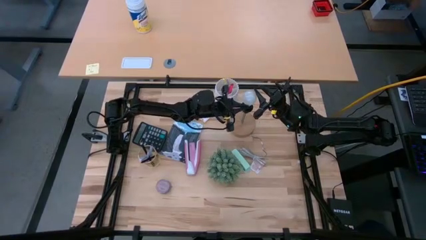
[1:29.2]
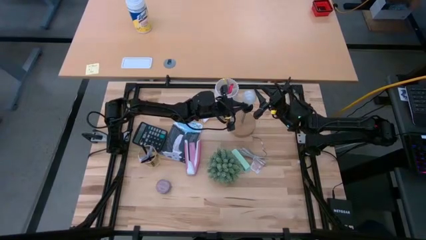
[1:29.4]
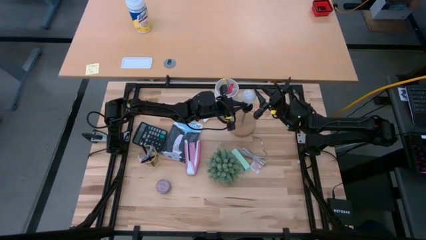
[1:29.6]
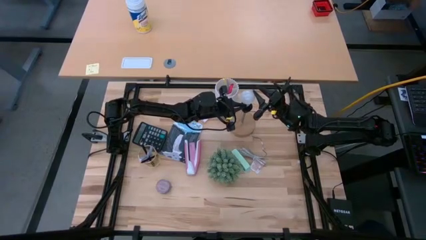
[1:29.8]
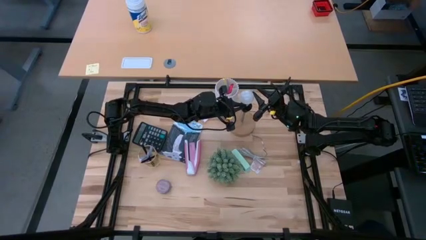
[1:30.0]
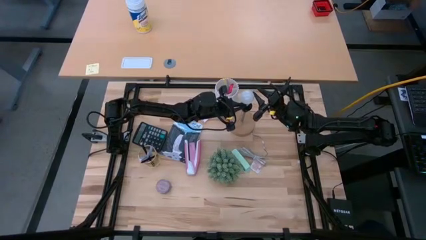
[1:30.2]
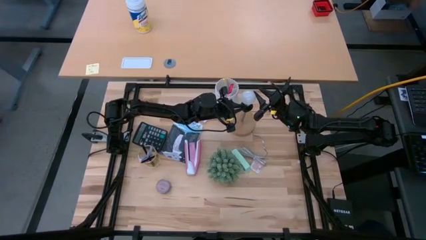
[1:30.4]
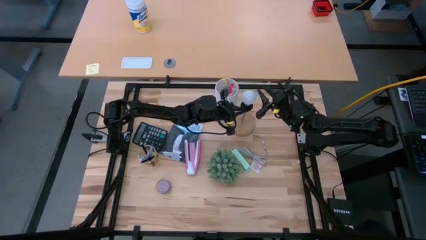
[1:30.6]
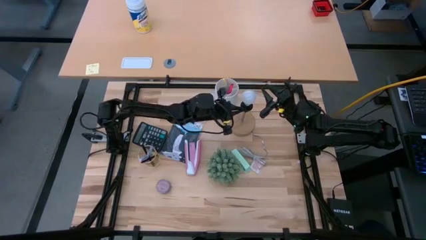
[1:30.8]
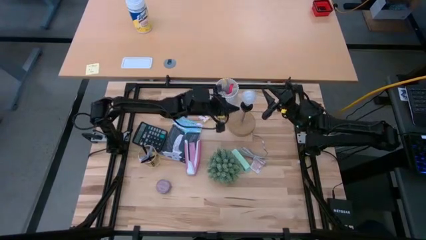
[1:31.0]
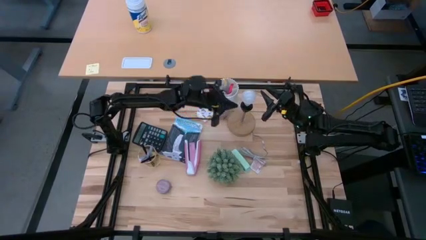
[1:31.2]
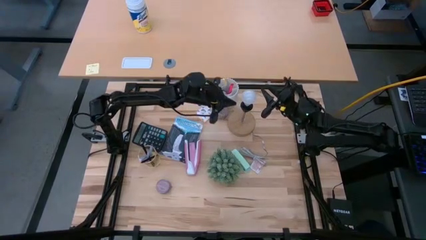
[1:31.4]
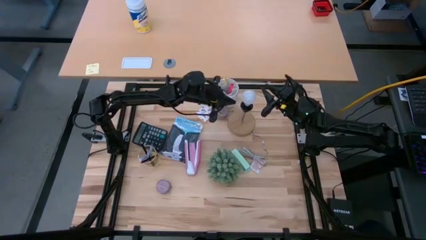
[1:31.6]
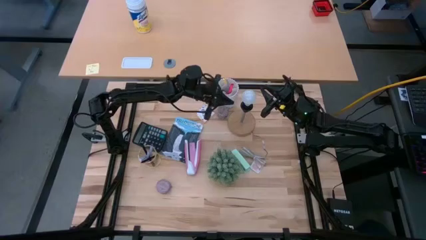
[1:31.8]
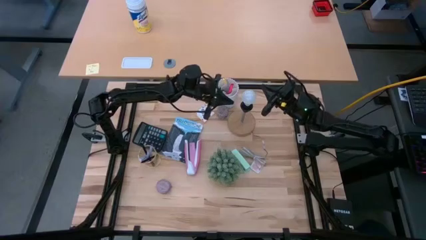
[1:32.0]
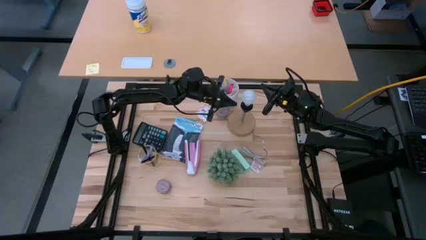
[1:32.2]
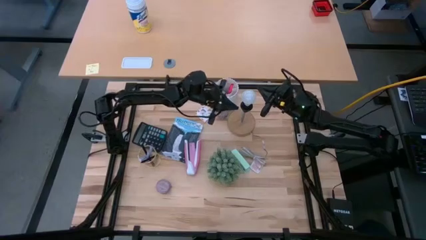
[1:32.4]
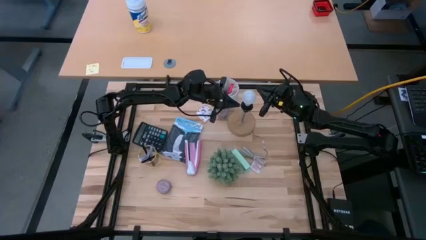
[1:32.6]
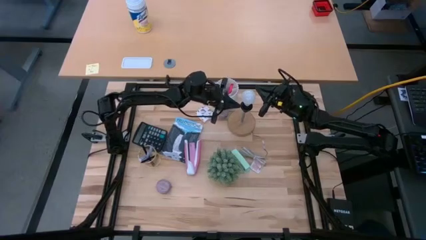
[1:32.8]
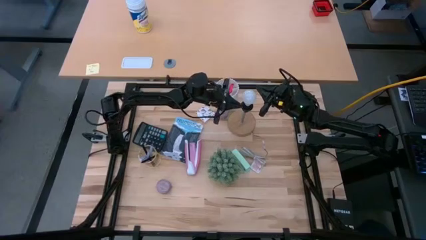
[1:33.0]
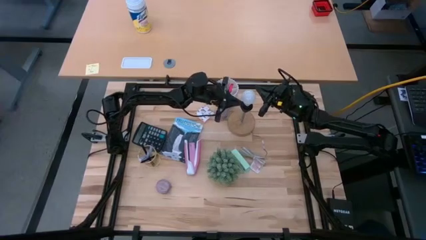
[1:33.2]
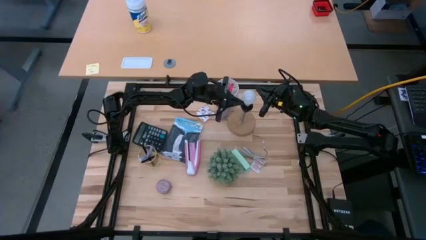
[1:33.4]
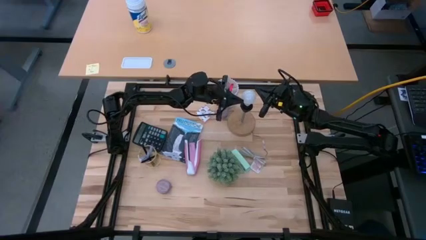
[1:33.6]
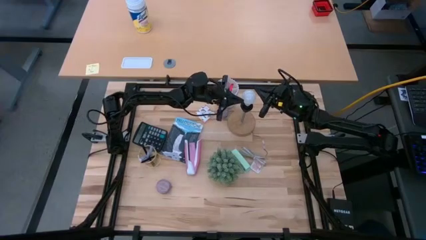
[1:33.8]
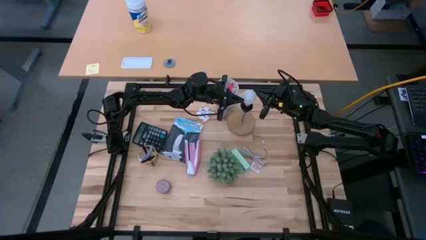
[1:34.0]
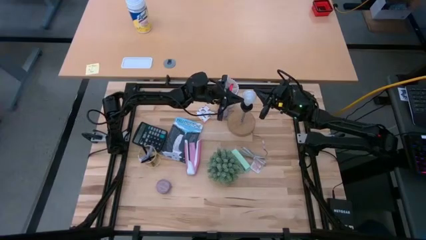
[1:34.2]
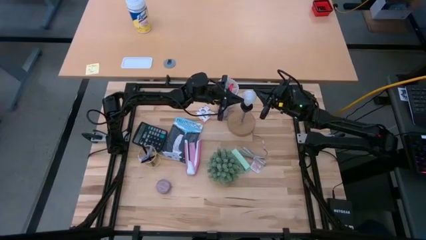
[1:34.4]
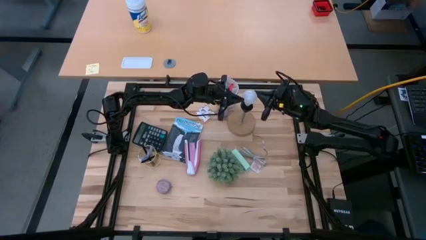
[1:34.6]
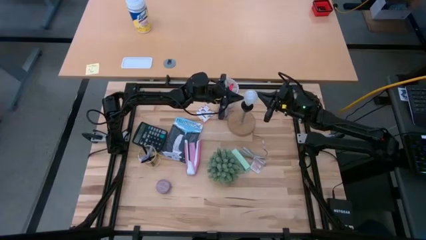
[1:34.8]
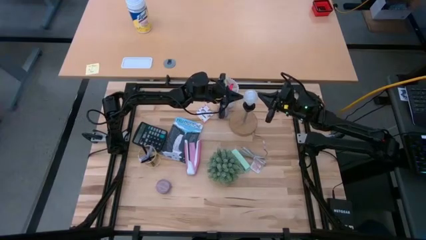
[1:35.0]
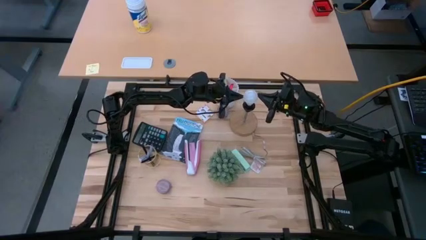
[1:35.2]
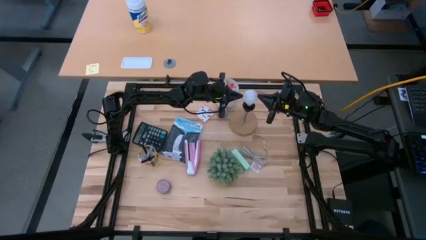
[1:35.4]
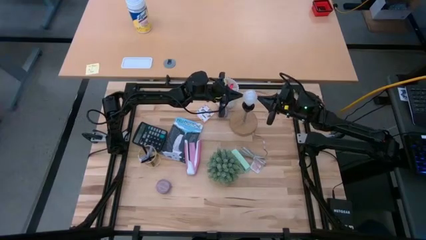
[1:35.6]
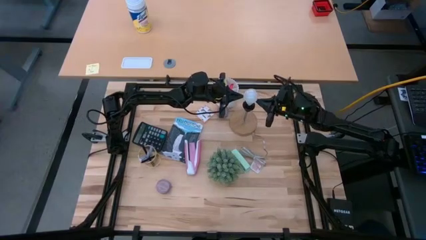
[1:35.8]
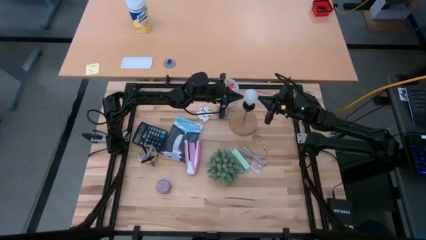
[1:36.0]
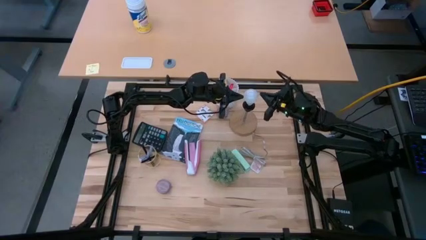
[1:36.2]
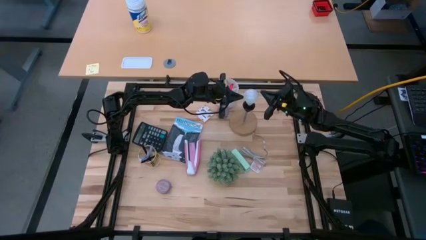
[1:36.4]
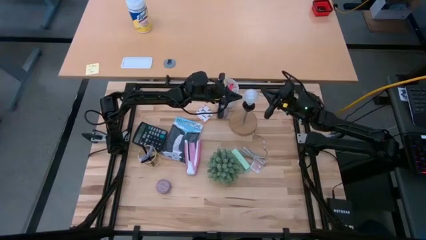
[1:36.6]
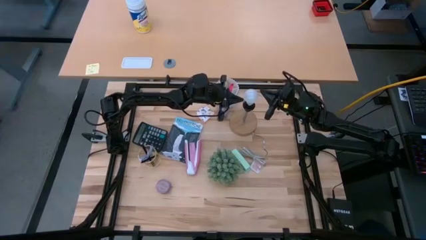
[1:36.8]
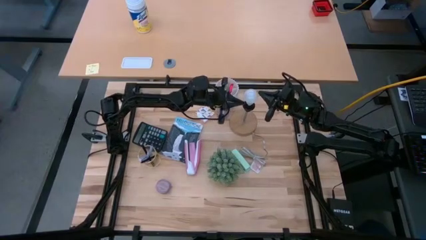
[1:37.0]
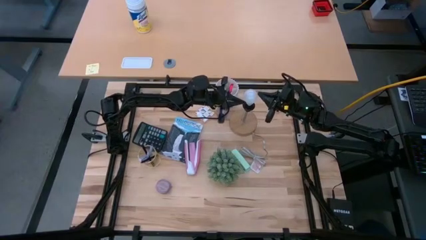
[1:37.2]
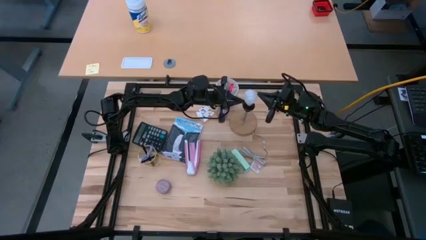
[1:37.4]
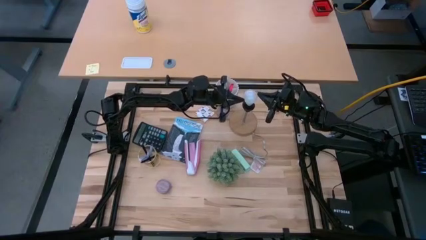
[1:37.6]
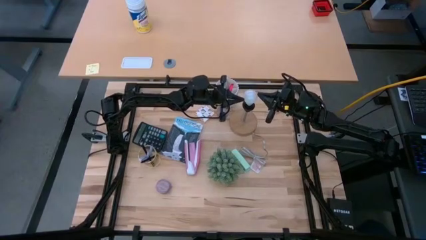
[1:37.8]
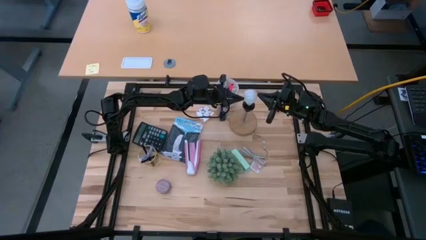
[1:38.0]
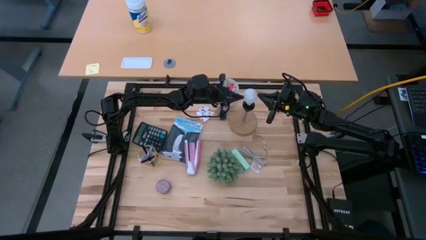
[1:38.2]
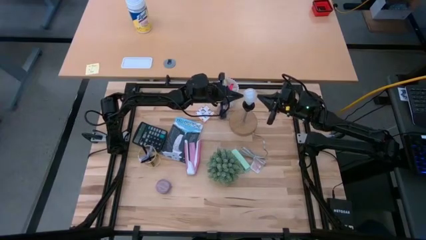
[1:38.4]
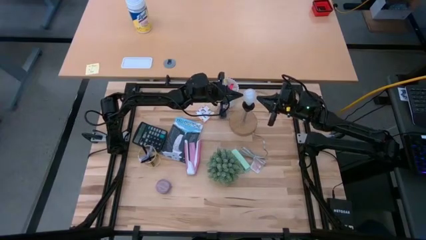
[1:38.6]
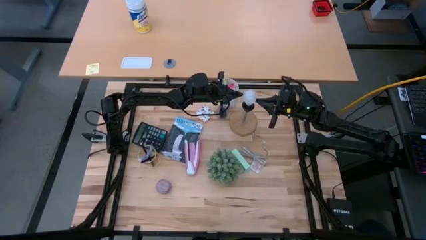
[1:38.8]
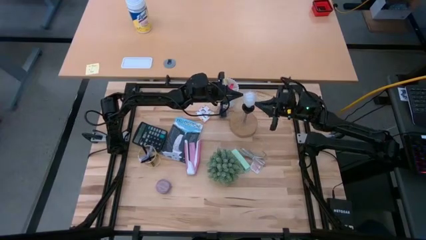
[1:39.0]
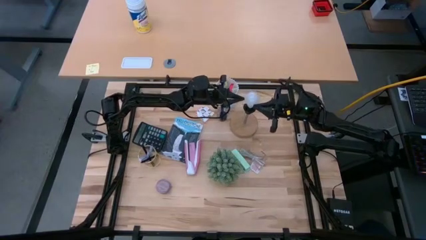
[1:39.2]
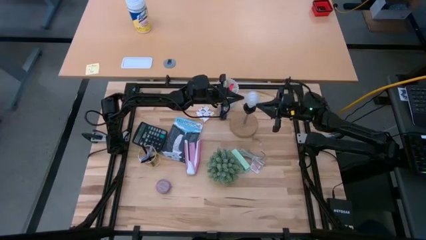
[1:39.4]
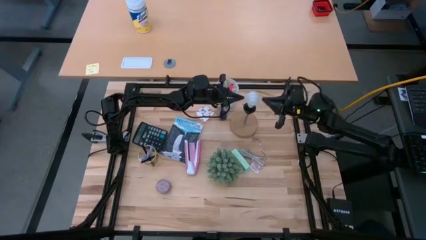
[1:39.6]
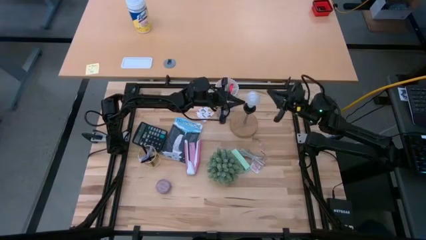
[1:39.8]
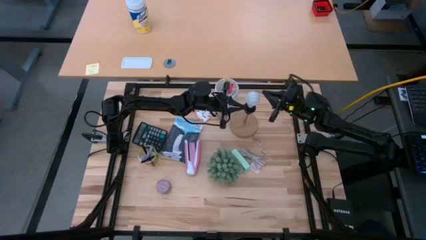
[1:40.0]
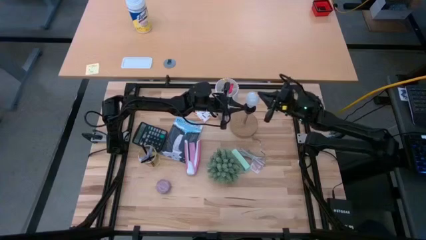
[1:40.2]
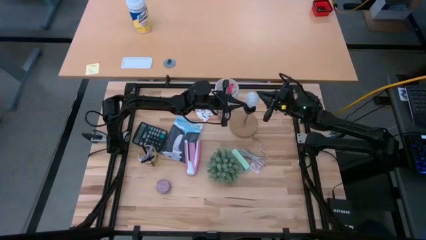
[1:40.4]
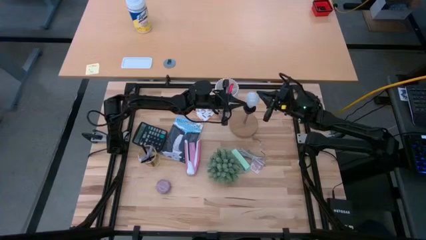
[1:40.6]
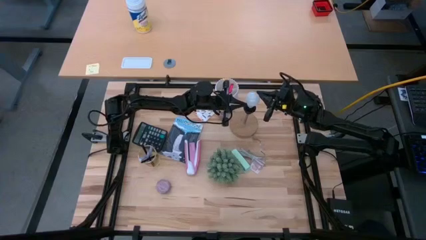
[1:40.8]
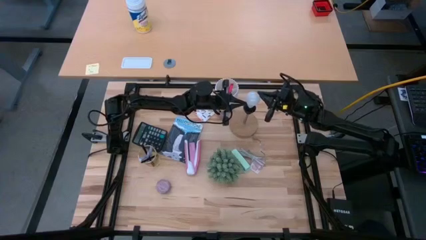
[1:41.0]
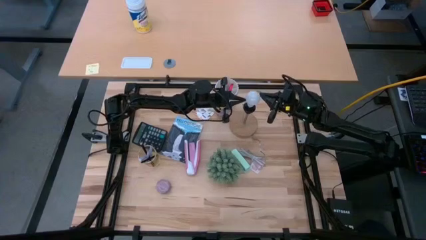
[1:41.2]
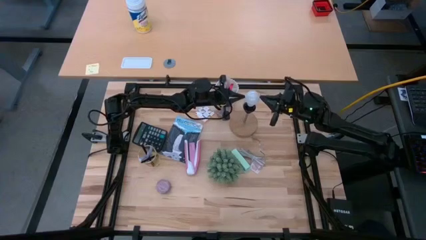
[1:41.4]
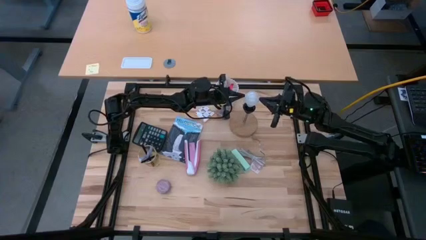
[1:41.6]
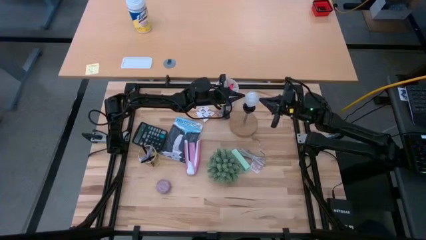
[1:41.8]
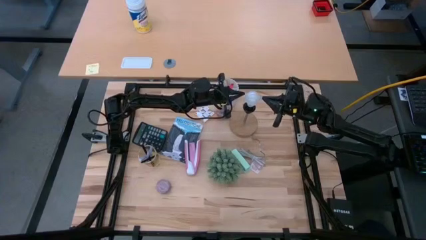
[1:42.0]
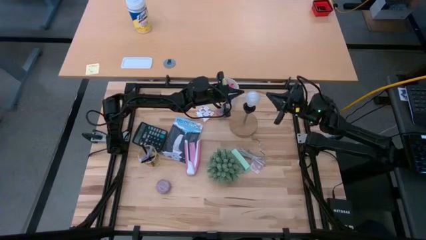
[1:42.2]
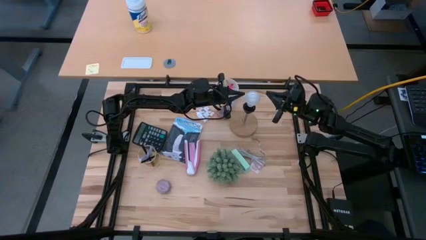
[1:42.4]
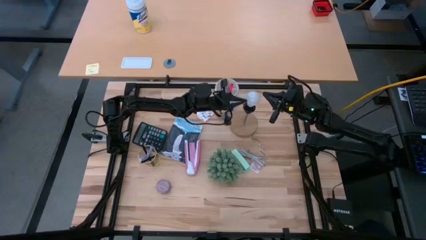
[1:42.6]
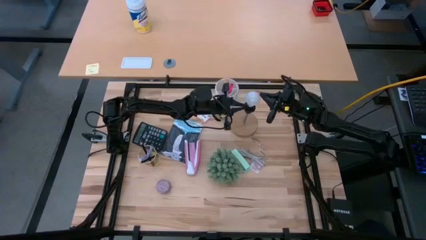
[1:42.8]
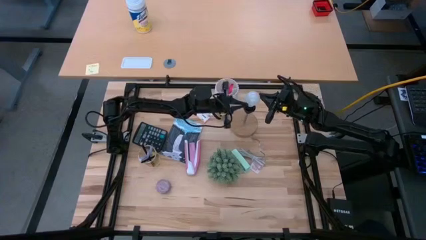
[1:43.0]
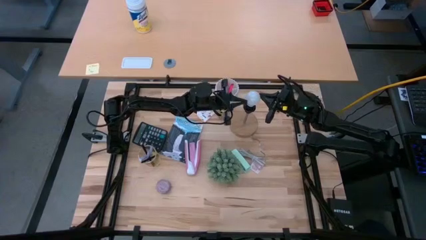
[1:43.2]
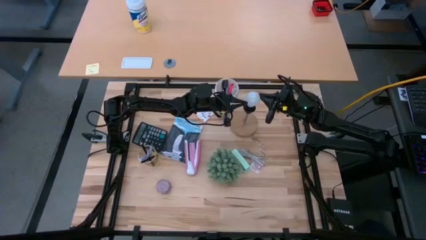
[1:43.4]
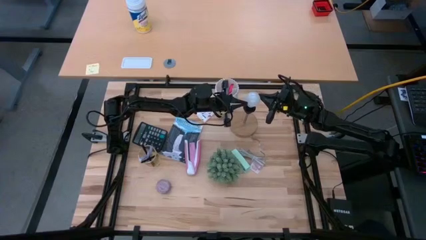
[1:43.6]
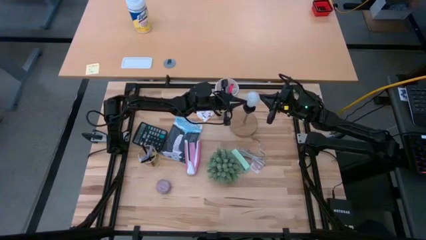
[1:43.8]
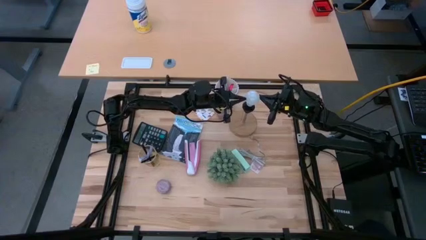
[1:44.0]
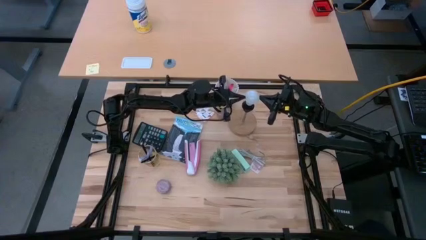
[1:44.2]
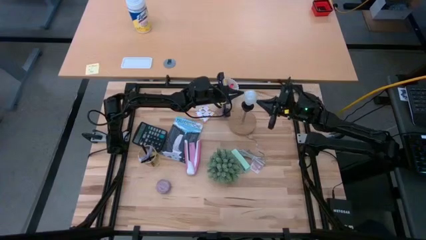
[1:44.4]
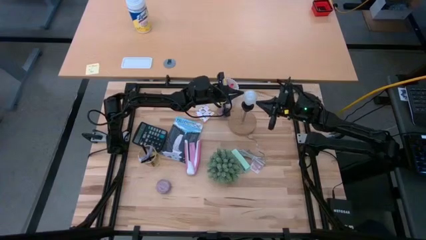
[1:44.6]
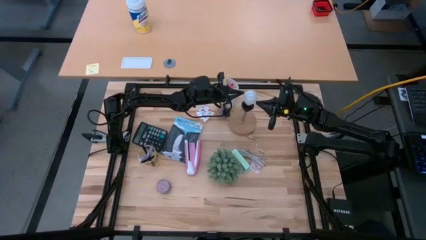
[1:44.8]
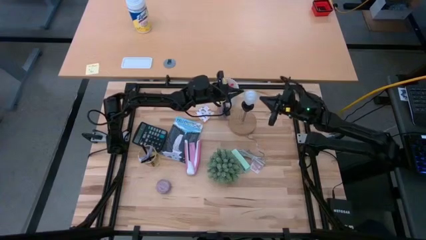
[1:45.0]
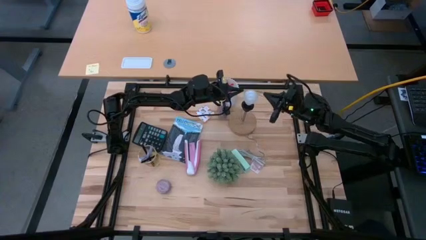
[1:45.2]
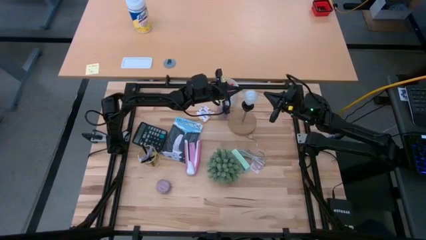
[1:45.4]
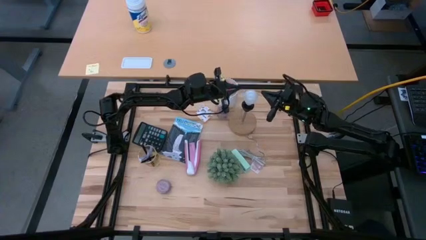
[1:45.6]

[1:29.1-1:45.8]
Task: Screw lightbulb
Insert the lightbulb into the lamp
